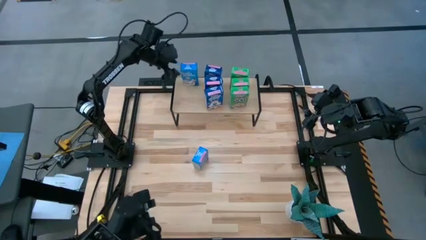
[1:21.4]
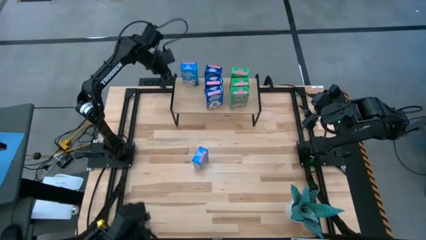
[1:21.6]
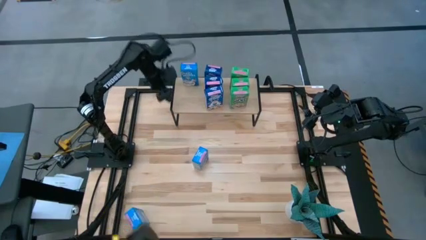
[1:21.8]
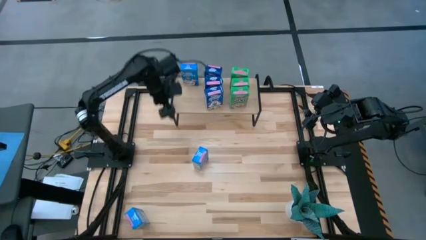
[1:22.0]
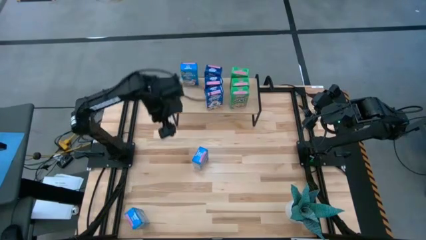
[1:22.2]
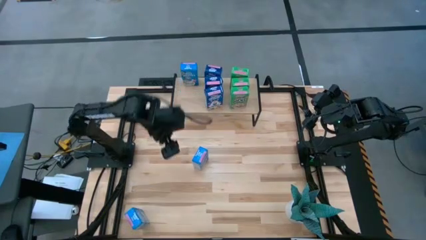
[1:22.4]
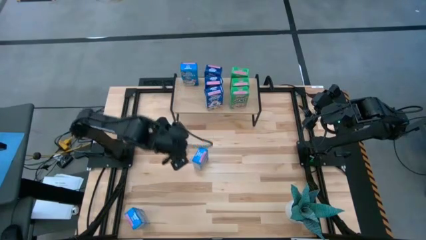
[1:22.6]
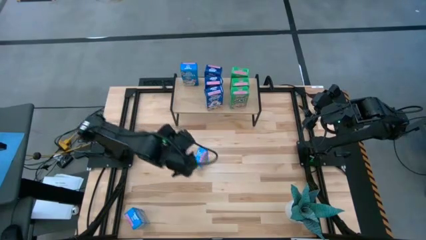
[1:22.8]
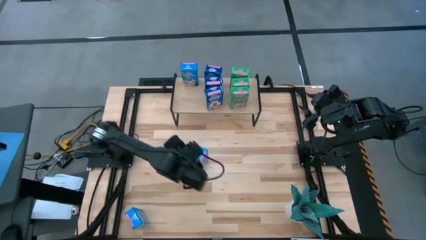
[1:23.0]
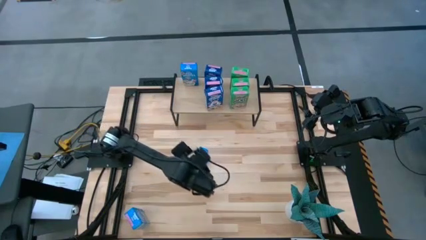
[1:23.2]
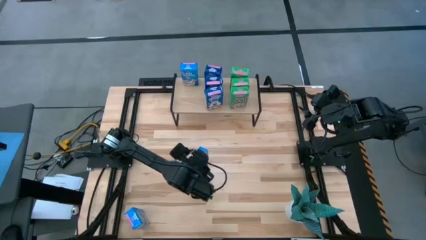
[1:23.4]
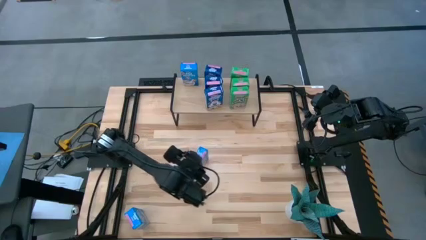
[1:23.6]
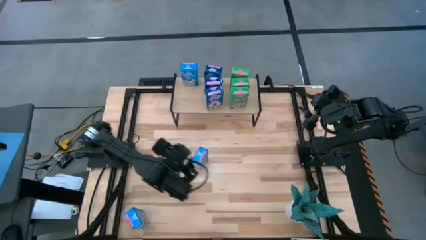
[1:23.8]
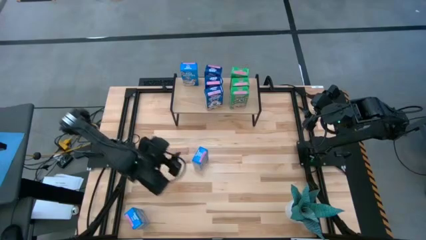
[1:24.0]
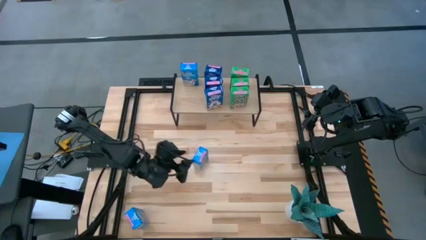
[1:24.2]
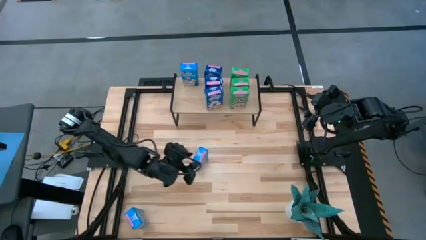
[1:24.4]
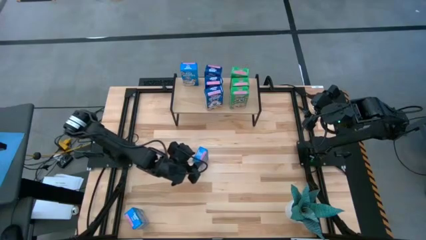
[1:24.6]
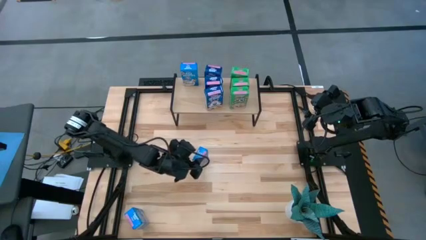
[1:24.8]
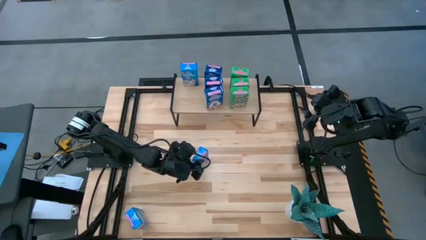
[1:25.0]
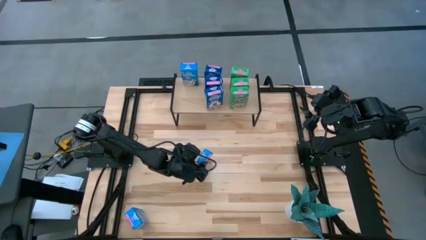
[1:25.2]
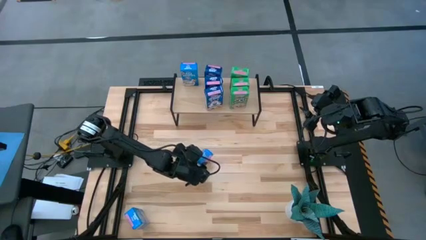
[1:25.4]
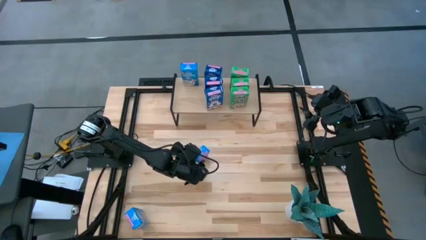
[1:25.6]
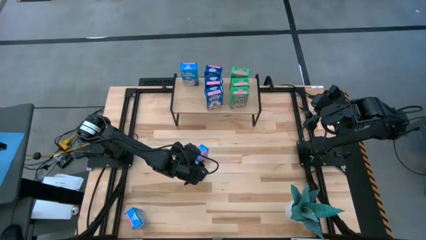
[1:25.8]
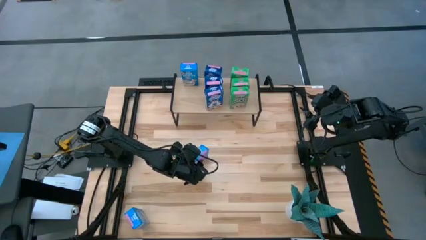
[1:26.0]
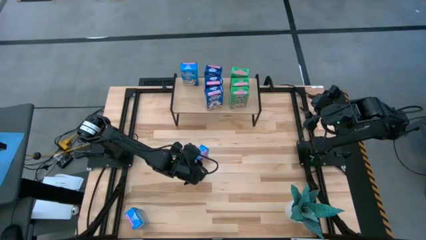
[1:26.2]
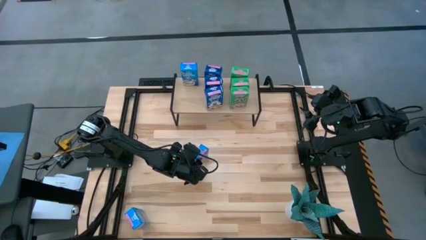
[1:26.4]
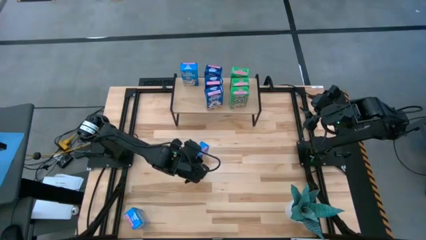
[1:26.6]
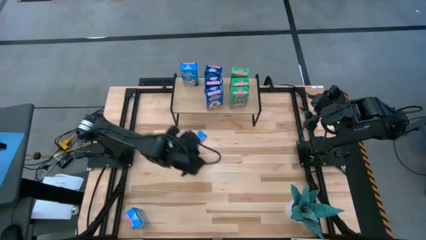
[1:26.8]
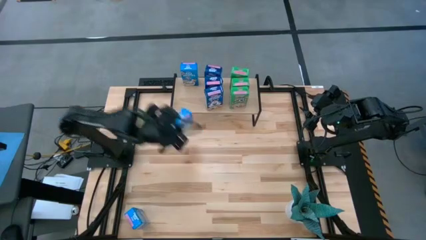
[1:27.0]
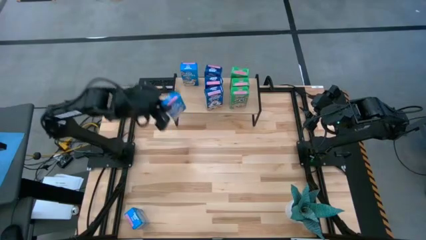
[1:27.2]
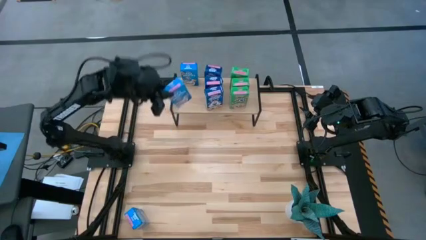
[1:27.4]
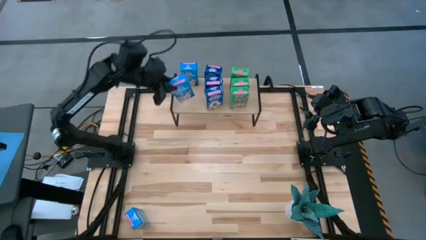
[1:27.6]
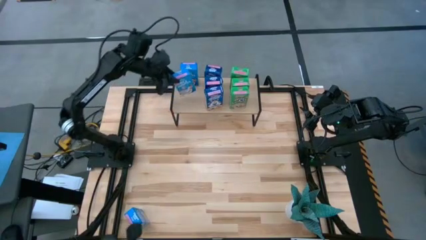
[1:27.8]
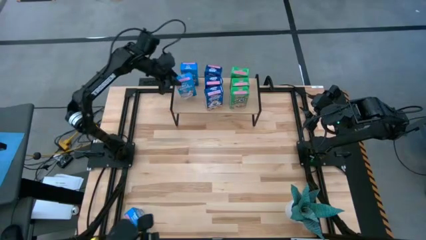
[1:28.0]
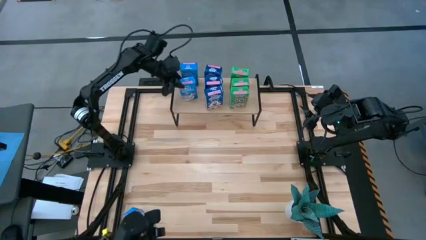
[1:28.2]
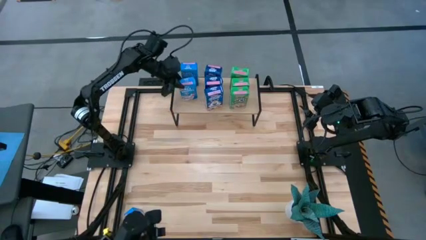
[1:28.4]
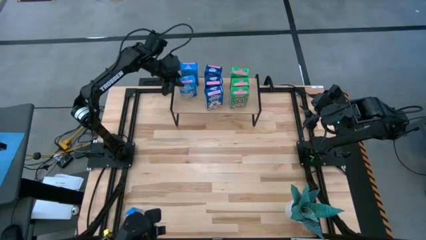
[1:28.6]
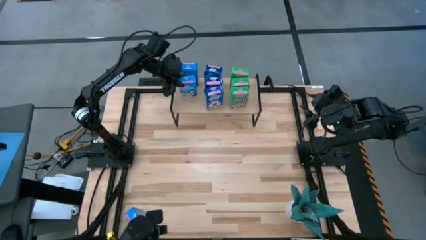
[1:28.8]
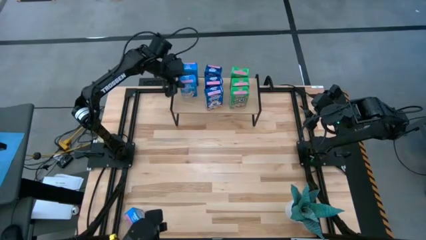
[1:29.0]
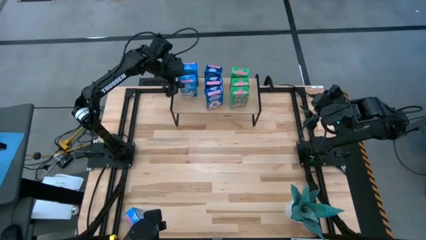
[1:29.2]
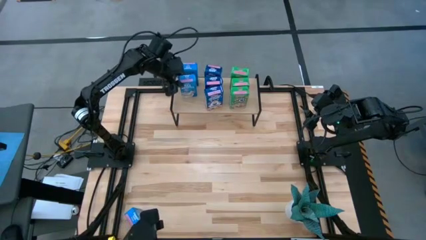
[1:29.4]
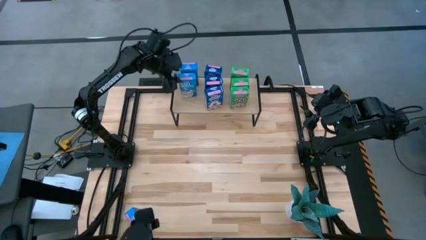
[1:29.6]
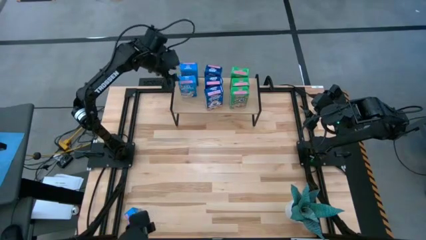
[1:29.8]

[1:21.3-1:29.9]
Task: Stack cereal on shelf
Put the top light blue cereal box aligned with the other light blue cereal box on the shelf

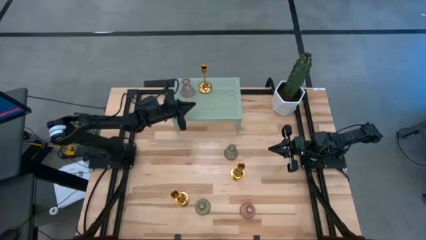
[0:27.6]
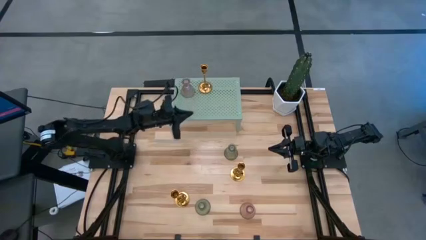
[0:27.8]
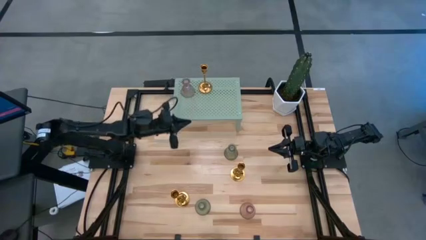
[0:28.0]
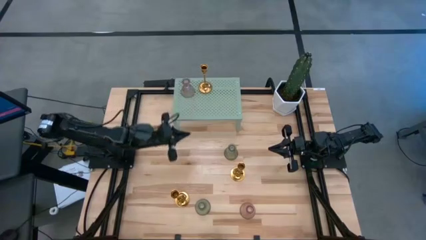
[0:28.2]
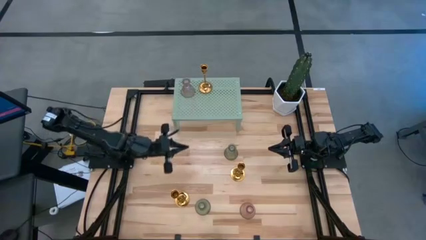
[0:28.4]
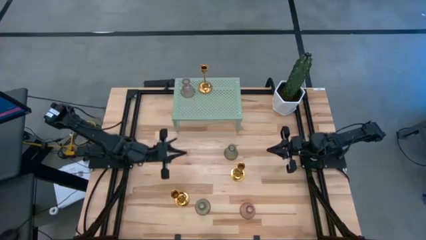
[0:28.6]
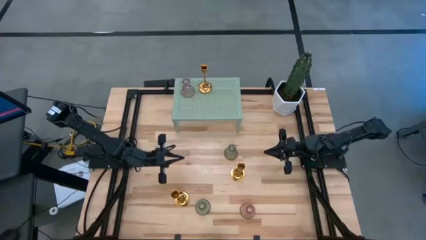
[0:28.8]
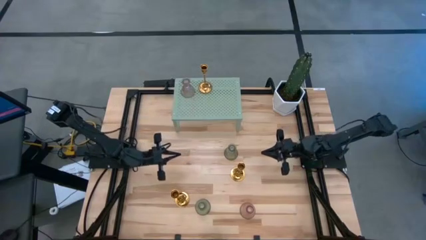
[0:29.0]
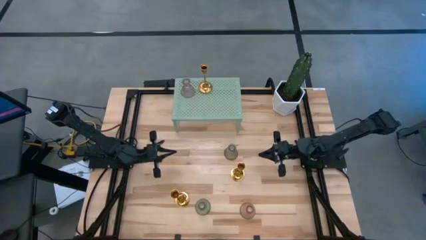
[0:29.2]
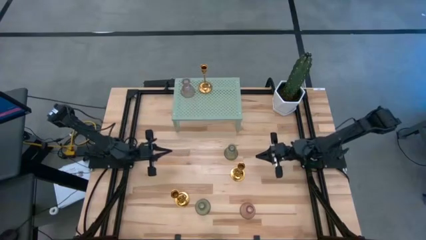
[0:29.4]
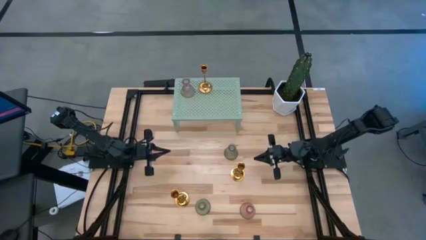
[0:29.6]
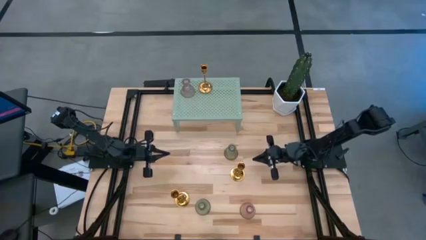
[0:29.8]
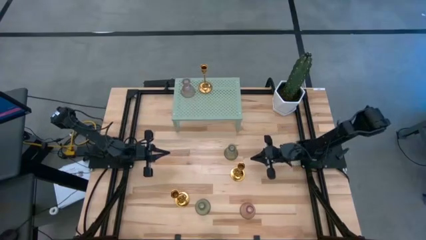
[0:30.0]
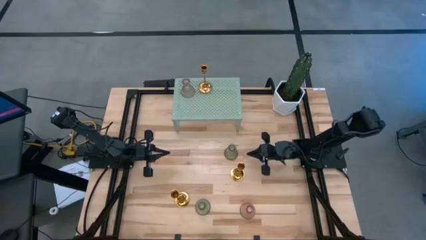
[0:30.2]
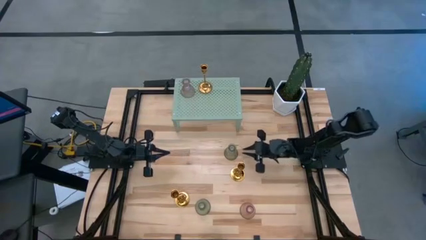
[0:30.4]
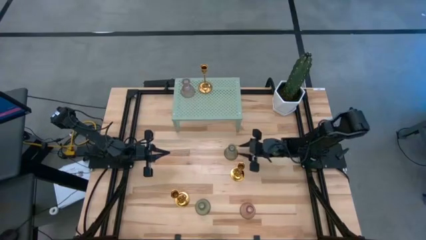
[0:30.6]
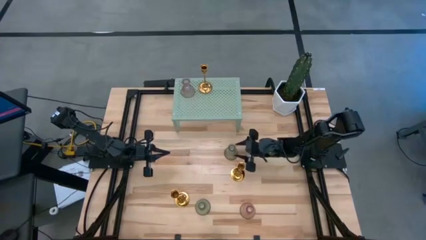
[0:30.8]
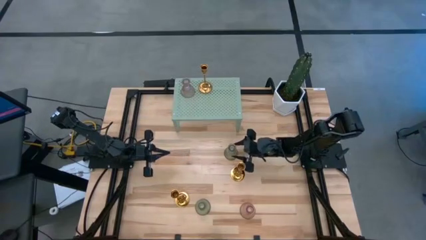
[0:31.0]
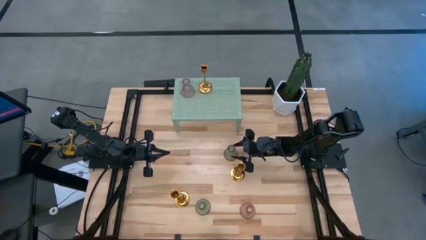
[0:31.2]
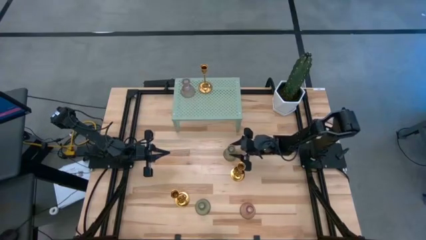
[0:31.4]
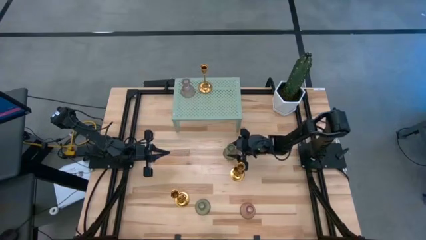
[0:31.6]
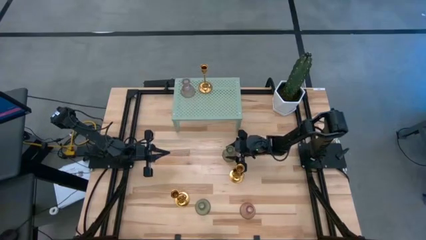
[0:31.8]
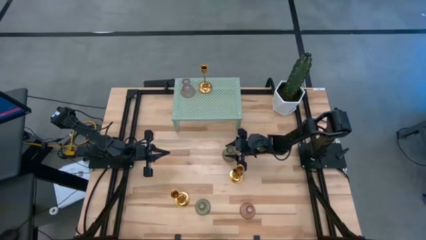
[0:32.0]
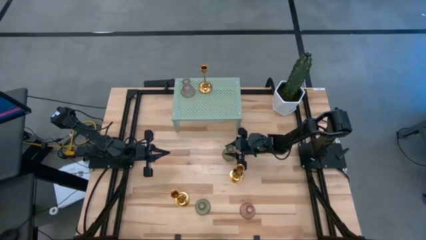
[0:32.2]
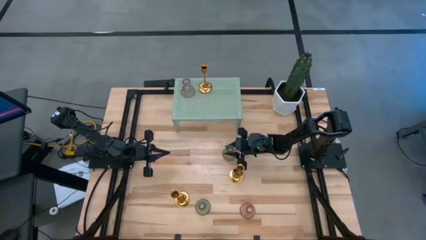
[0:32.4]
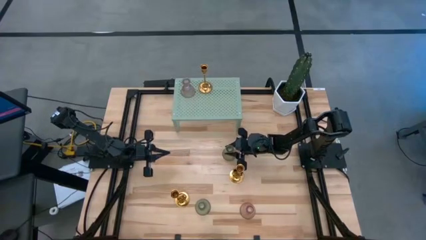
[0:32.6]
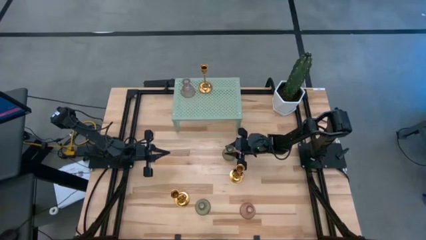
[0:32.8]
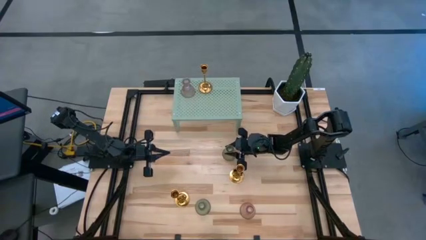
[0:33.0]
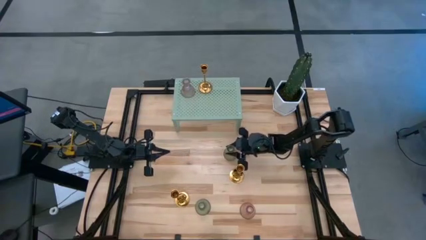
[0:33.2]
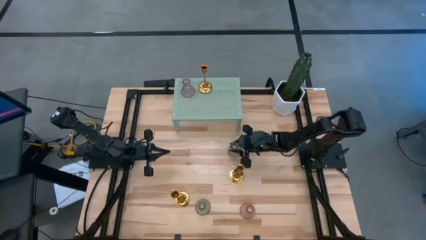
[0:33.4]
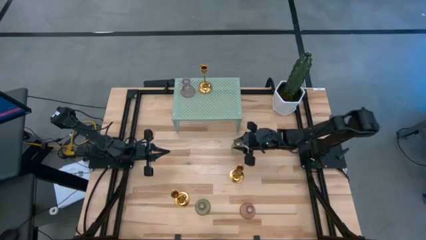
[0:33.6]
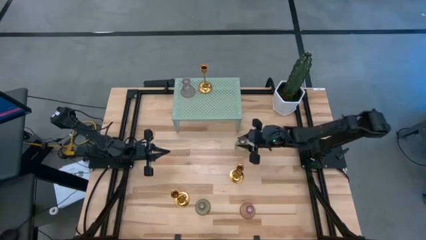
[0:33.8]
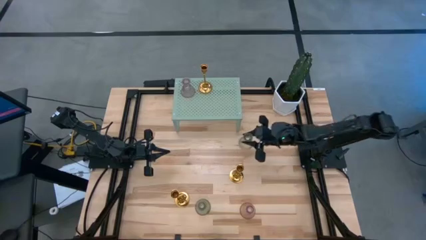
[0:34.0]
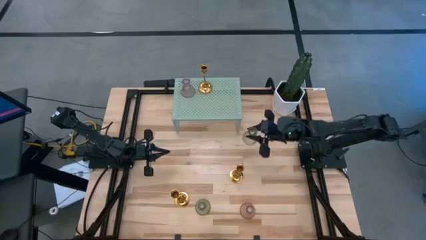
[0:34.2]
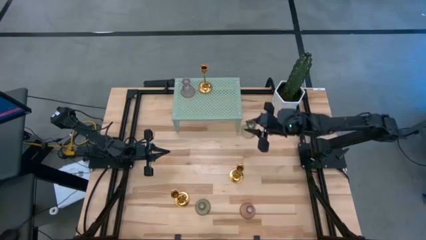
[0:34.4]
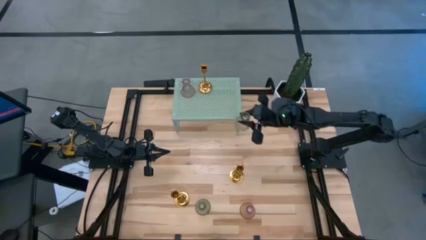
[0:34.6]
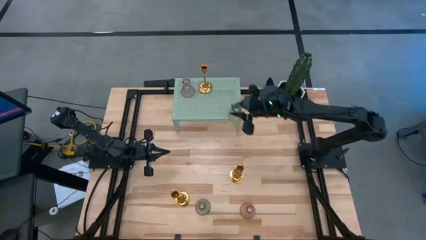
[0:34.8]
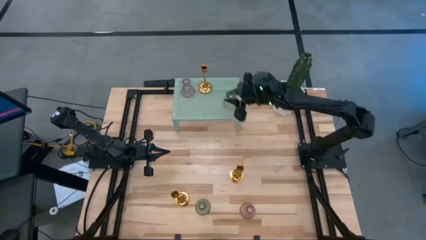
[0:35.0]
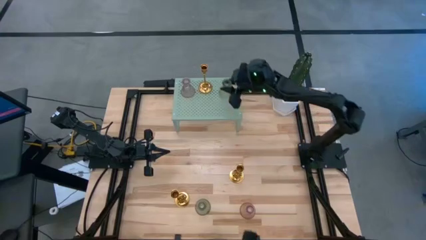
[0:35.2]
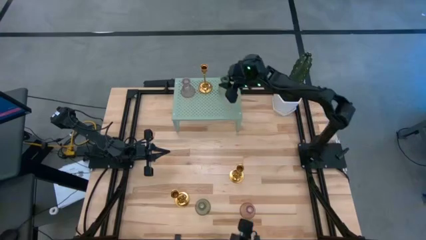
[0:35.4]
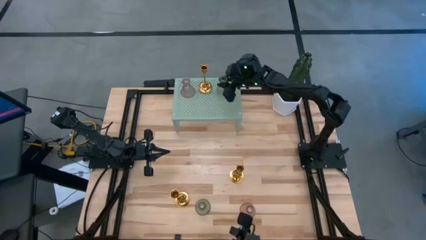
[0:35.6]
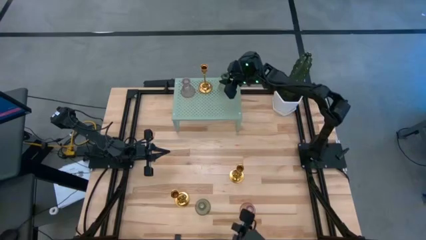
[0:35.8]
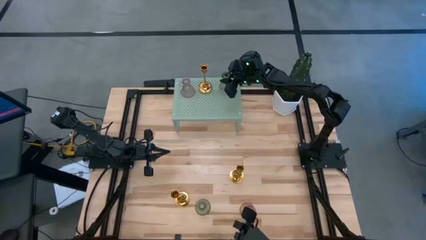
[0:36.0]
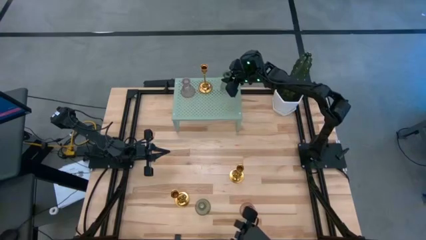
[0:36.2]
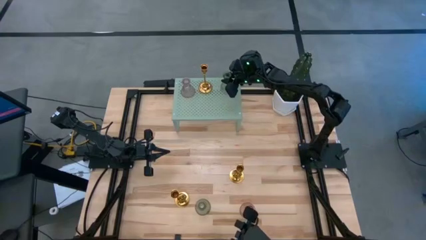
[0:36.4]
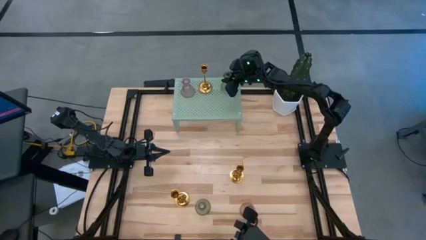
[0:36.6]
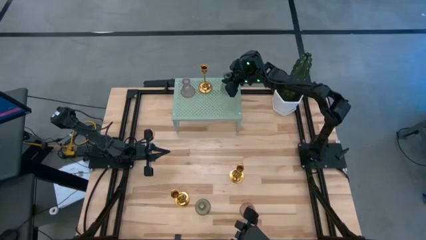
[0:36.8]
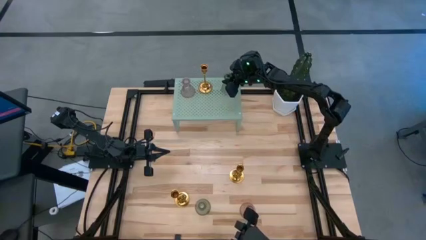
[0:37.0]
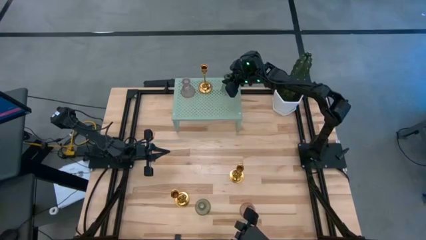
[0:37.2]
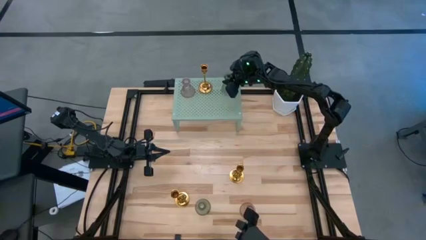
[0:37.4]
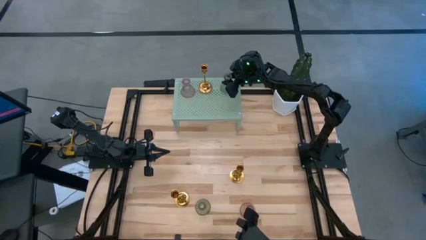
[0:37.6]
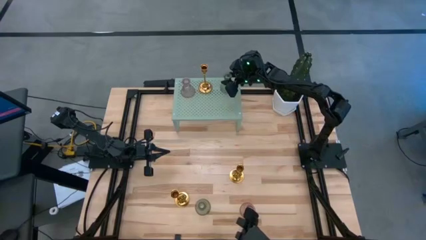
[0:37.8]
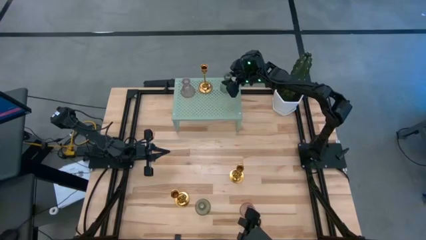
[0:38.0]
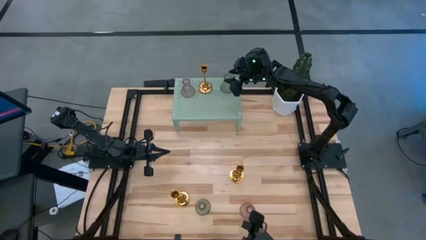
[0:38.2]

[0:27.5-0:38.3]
Task: Pick & Place candle stick holders
Put the top green glass candle holder on the shelf
